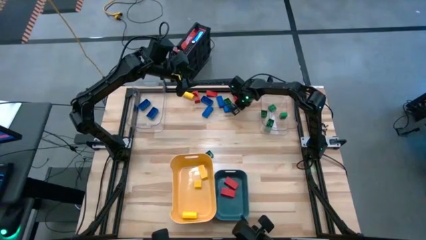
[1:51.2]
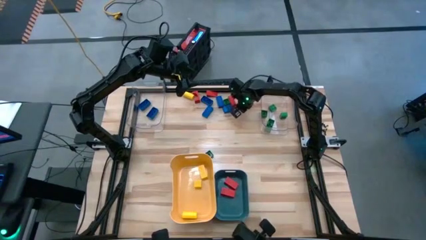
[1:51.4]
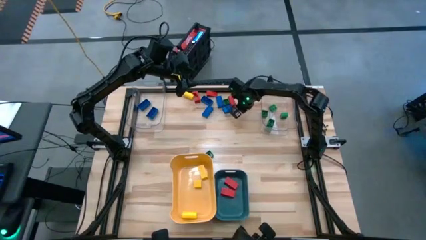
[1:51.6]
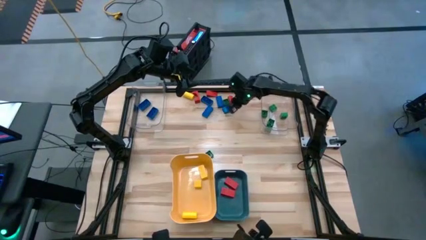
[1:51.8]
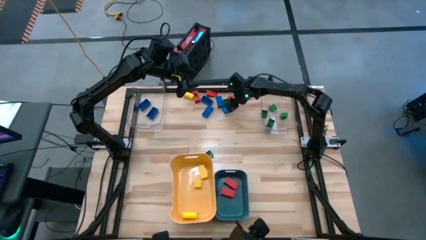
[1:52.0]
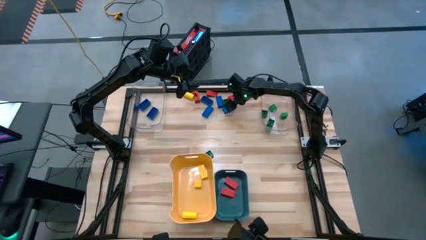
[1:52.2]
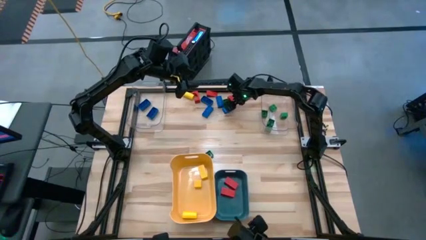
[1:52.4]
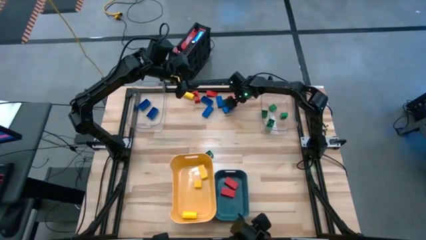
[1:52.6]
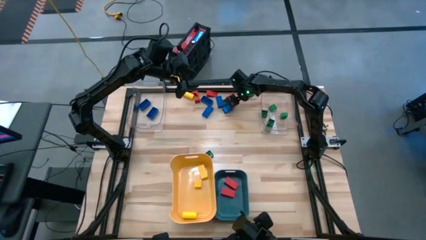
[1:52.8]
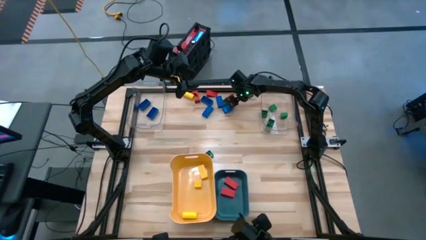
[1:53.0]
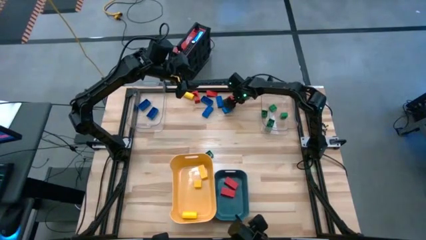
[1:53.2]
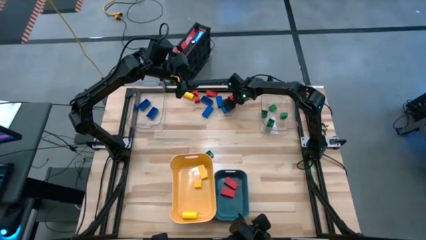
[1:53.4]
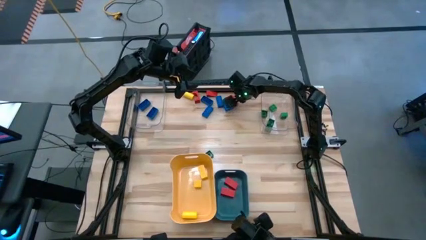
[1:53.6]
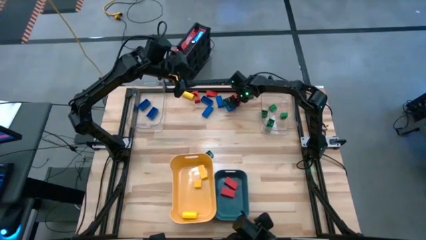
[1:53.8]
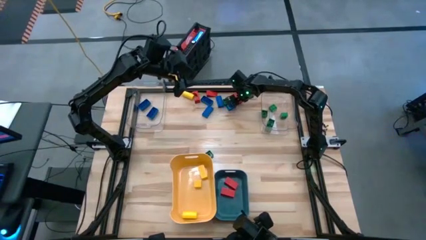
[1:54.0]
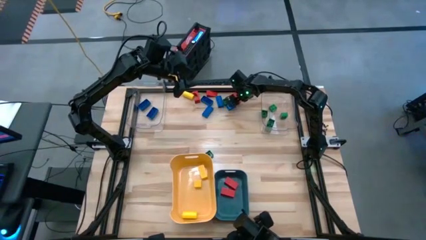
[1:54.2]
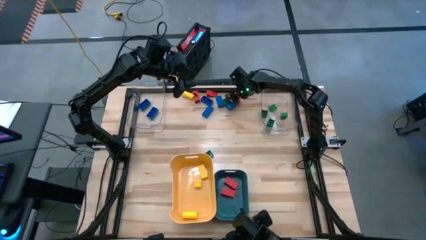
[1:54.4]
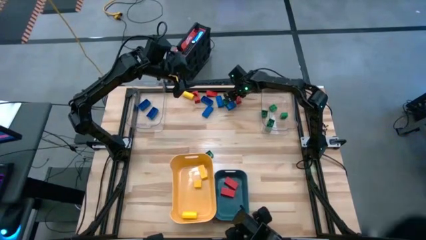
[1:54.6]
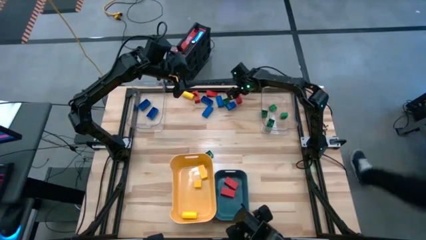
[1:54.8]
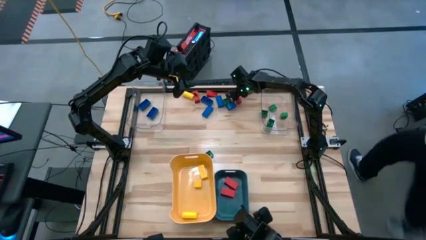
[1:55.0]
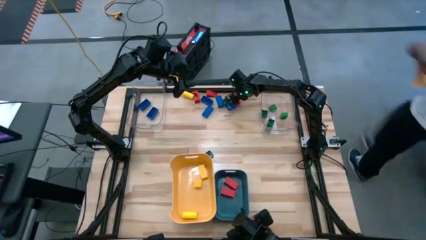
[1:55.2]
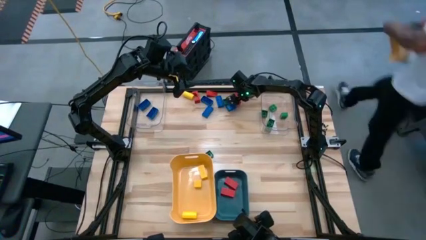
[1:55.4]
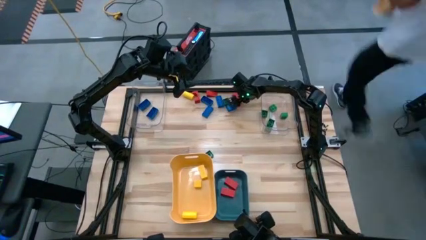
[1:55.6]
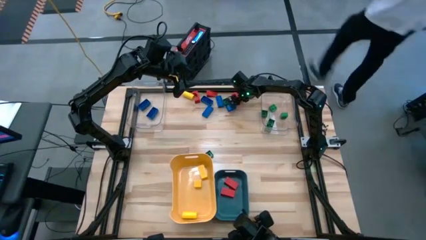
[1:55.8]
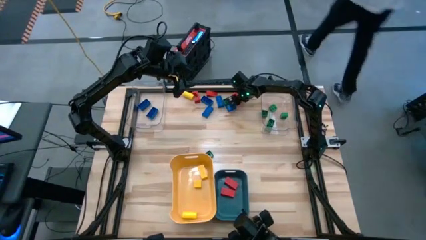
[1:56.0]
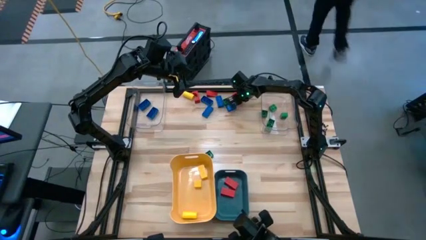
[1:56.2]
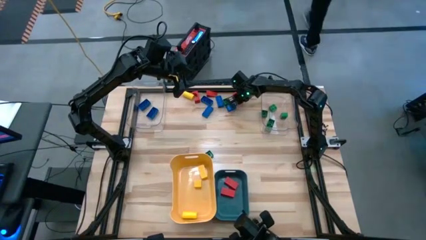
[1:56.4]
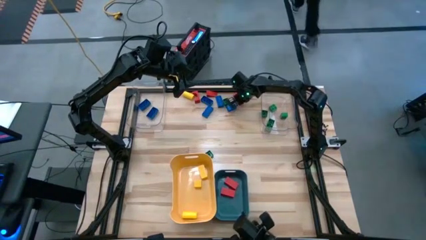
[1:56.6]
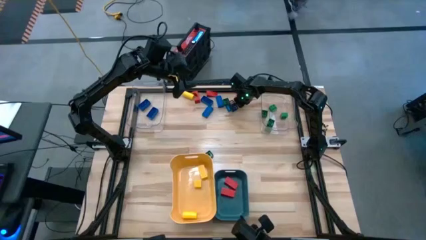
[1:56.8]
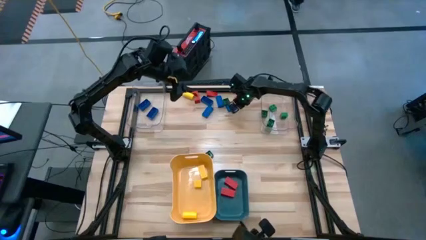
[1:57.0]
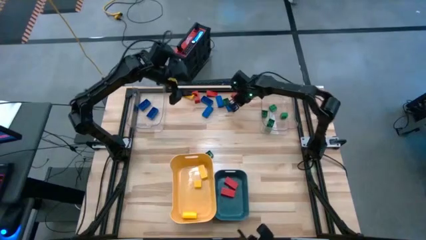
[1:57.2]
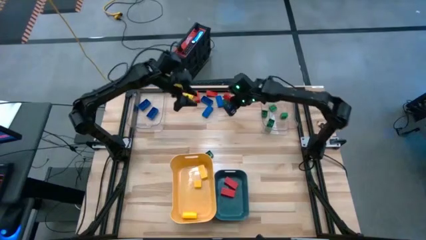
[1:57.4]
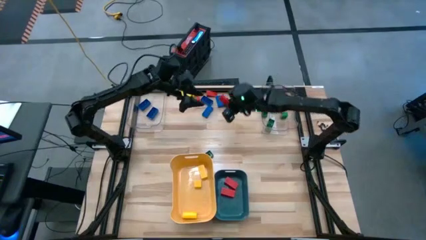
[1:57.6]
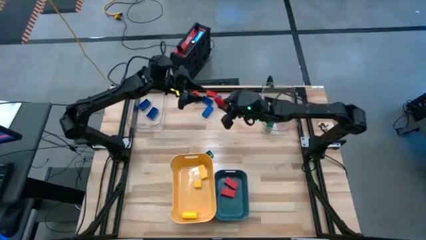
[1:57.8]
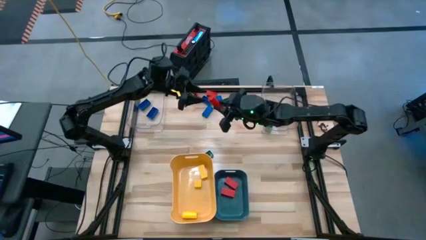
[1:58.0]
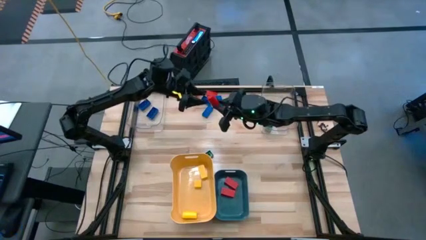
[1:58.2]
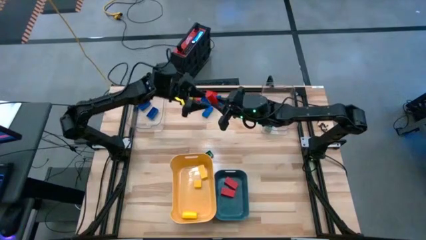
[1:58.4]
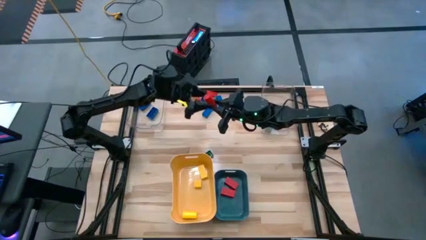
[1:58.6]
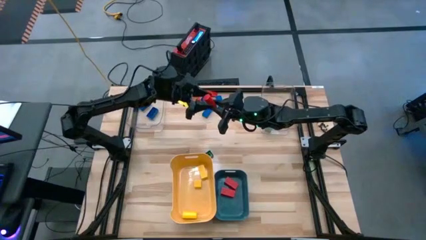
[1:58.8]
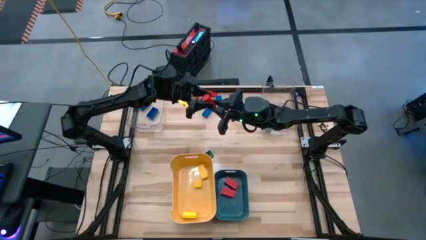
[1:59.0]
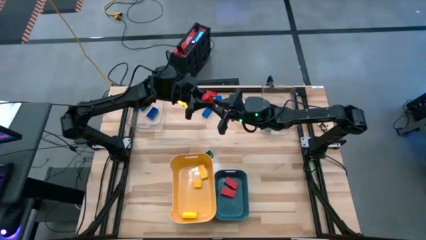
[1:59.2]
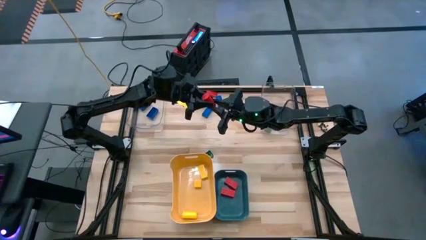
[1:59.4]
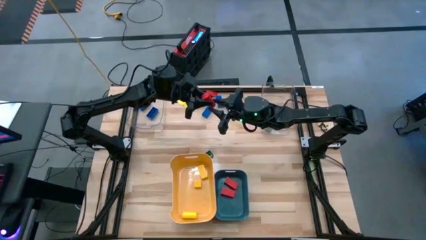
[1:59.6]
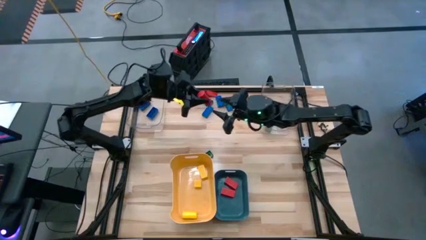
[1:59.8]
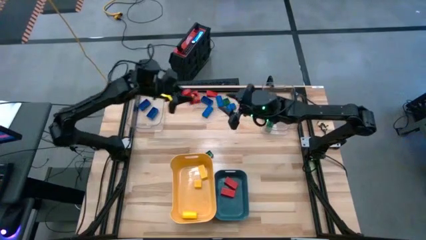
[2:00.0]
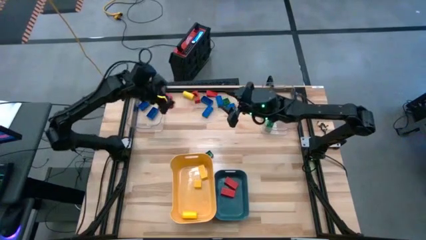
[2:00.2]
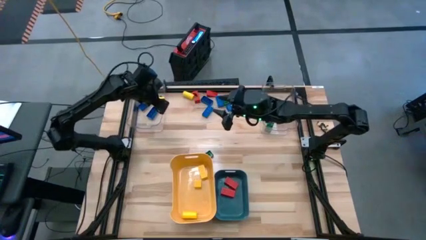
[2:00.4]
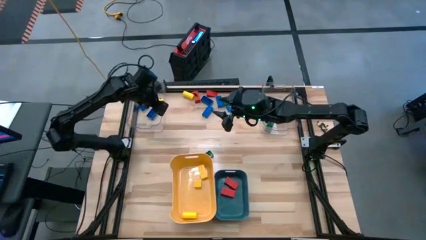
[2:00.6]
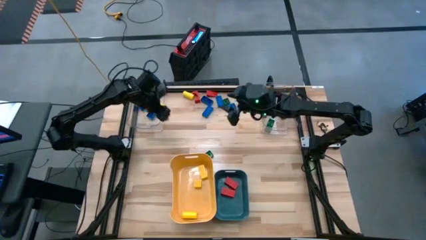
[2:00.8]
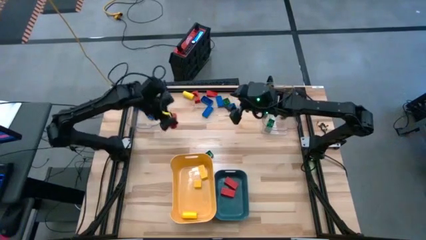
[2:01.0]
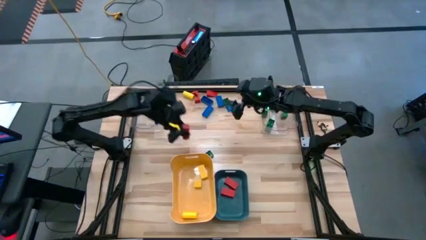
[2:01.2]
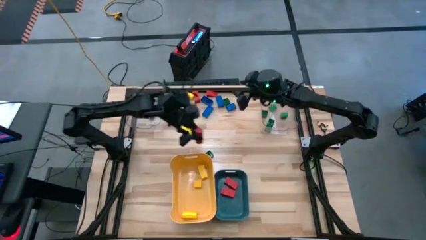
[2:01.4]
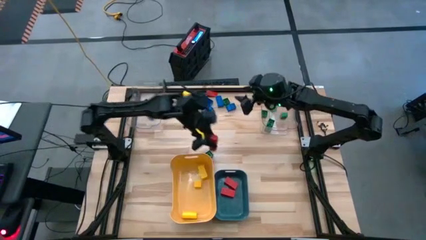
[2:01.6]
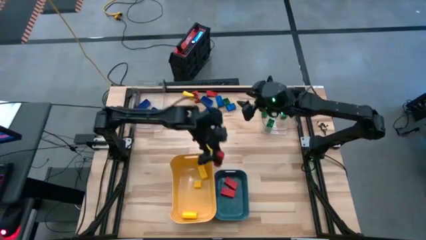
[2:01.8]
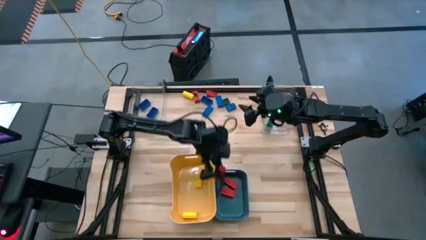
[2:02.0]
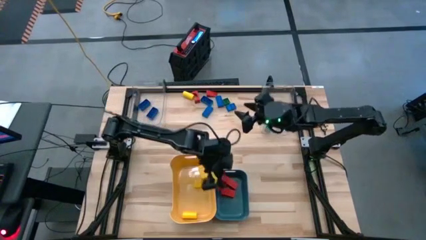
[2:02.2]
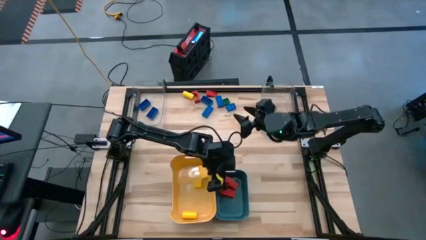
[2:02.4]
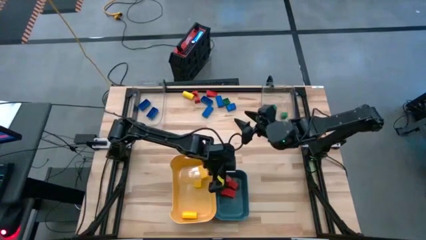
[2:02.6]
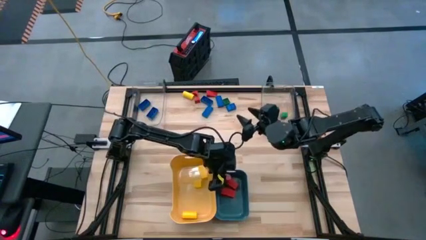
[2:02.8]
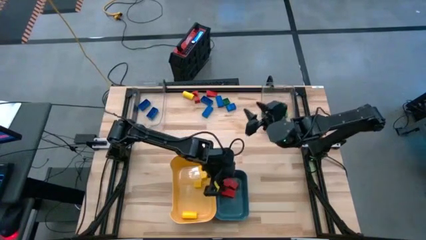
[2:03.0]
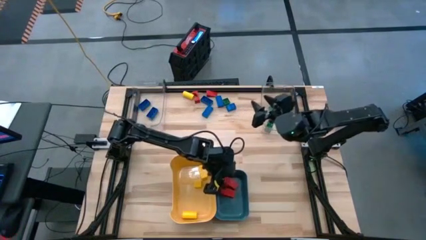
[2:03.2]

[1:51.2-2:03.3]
Task: Sort blocks
Put the red block into the blue bin

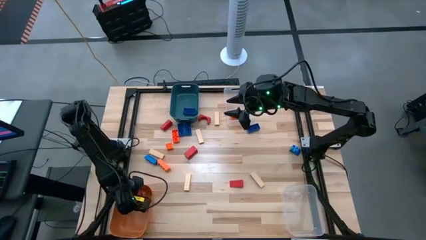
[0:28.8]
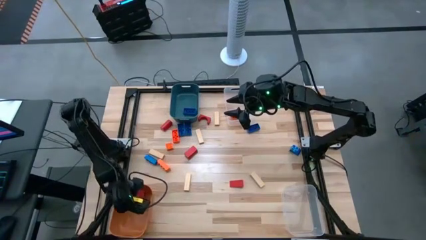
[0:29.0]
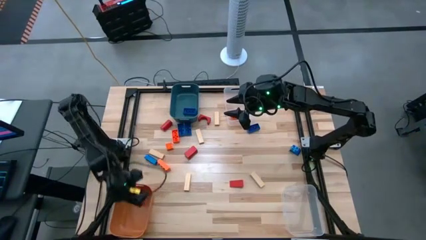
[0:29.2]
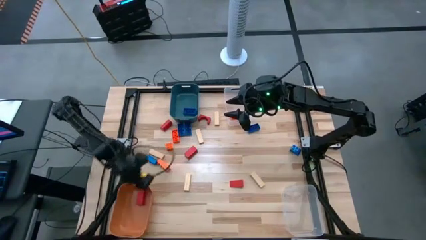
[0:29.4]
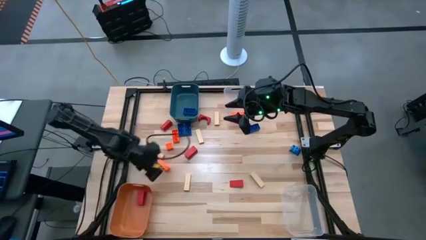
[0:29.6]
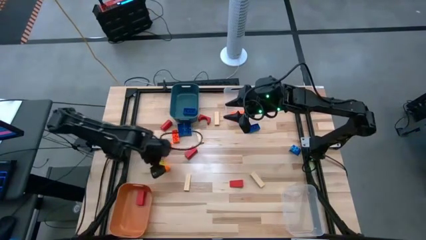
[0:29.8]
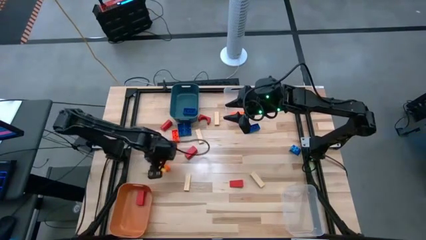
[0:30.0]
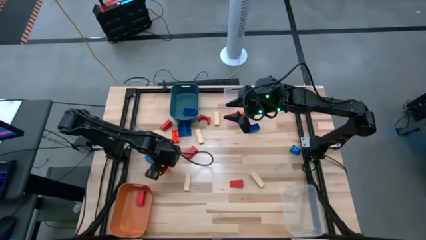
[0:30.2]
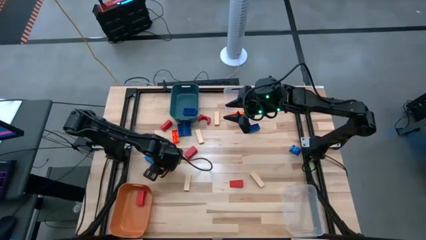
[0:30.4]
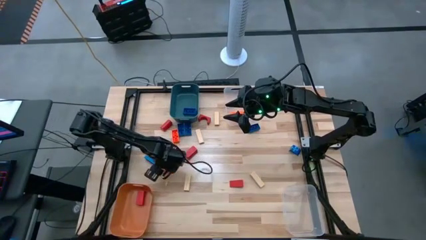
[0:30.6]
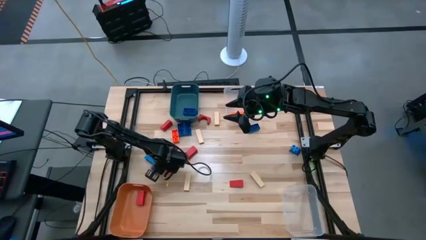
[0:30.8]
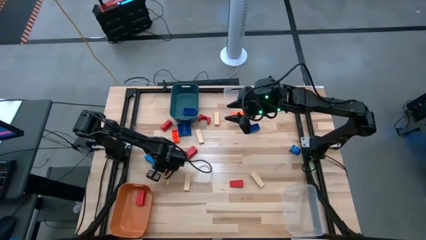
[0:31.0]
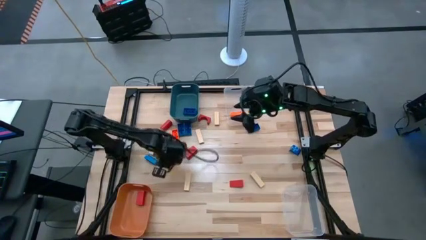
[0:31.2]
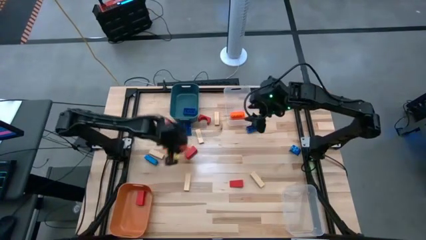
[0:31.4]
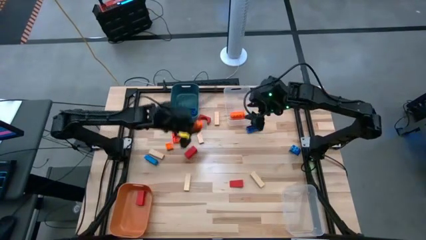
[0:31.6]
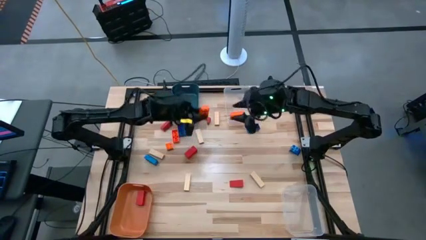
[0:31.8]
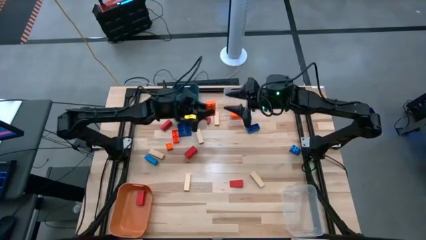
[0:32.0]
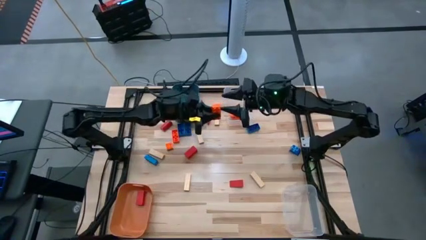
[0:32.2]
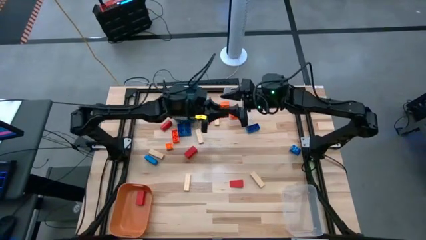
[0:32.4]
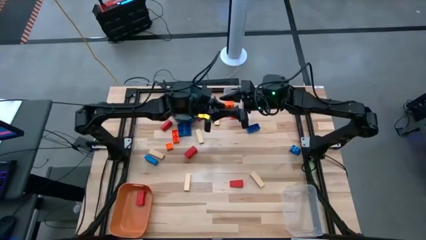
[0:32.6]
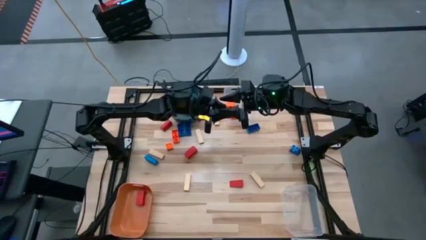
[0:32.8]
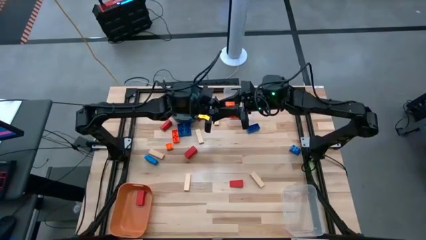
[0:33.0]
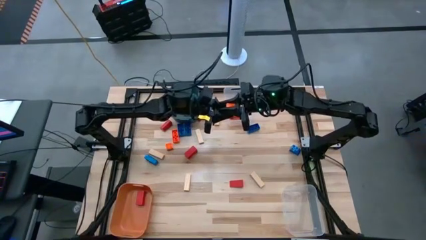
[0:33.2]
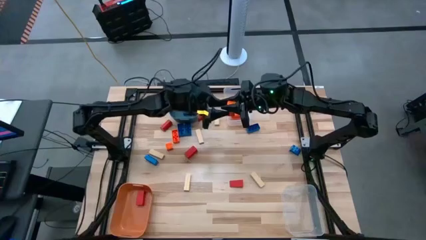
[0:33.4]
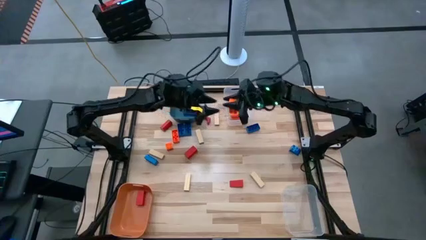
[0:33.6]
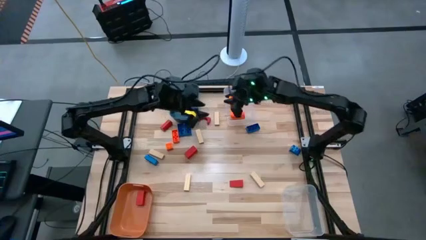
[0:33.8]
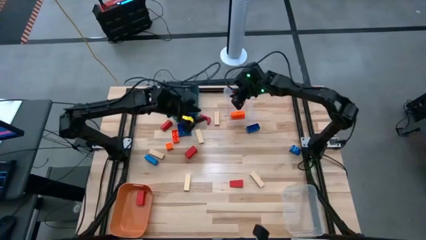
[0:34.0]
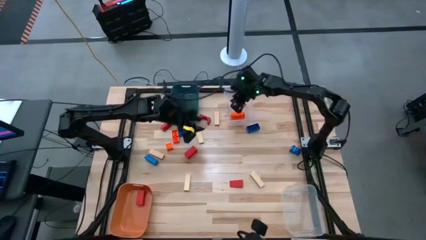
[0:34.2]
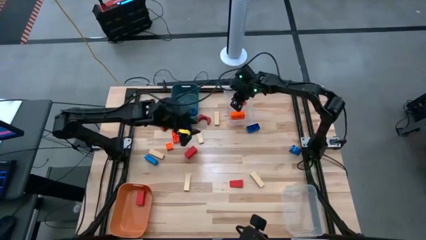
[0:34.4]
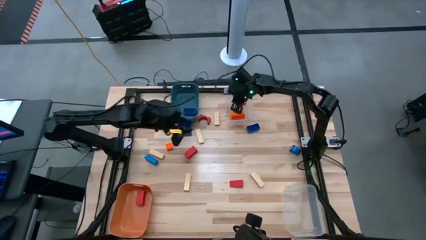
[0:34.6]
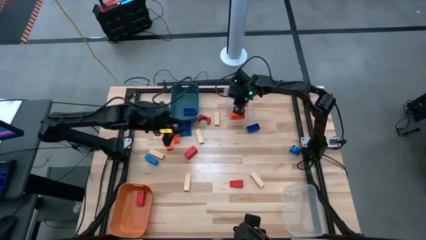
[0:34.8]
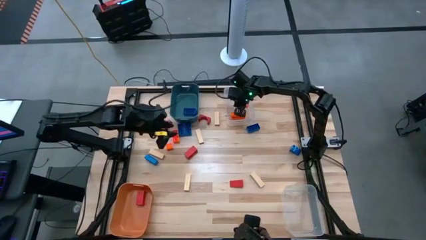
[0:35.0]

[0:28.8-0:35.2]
Task: Sort blocks
Put the orange game piece into the top transparent bin
